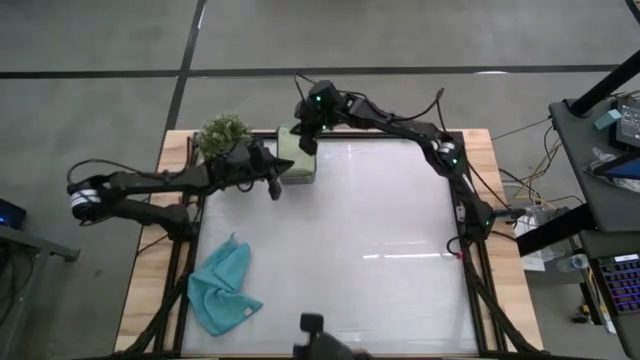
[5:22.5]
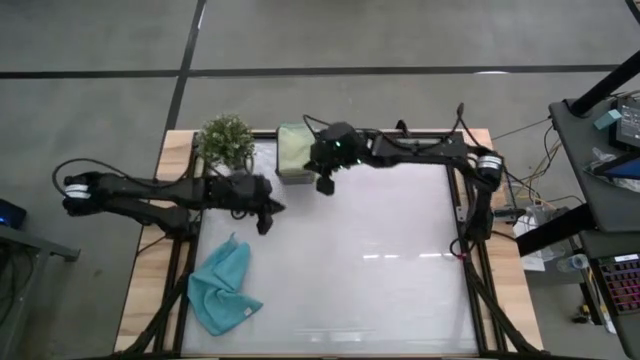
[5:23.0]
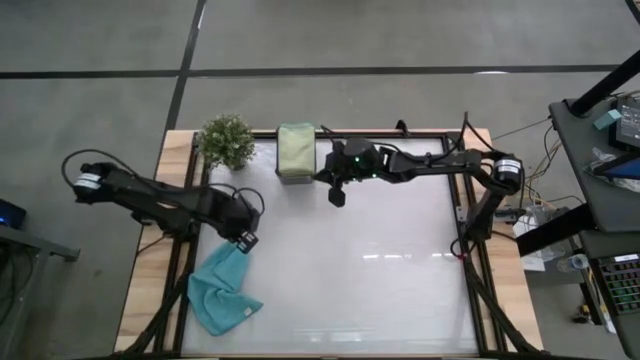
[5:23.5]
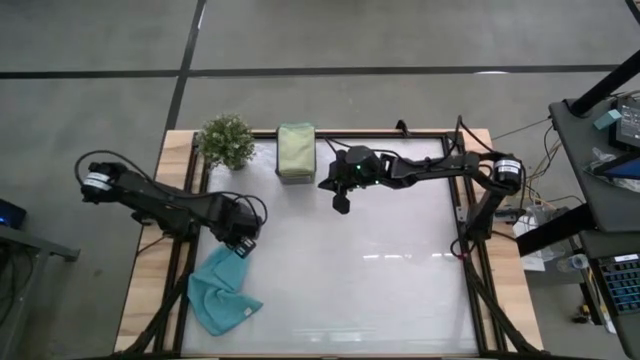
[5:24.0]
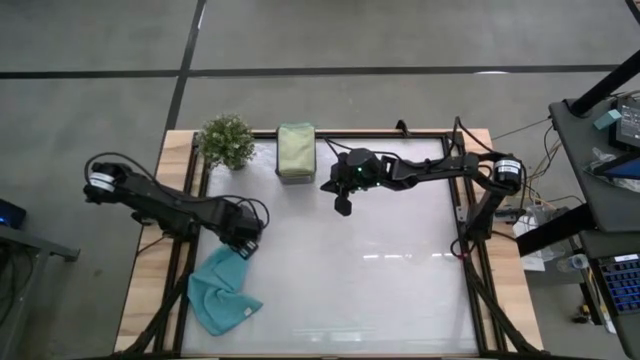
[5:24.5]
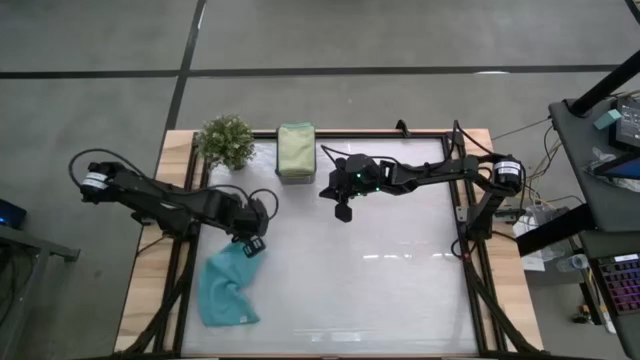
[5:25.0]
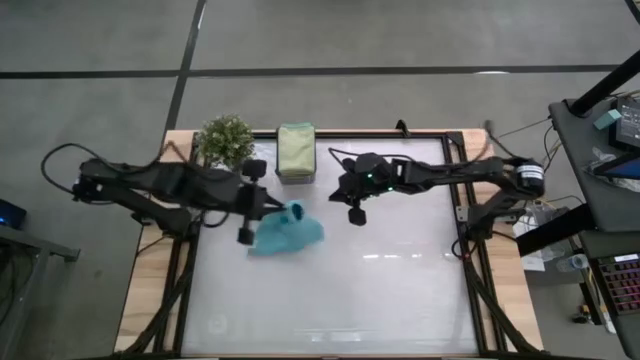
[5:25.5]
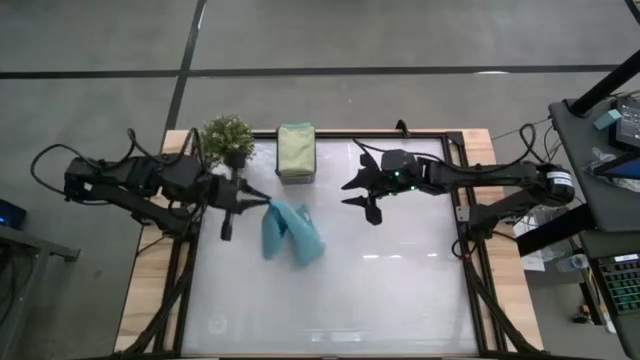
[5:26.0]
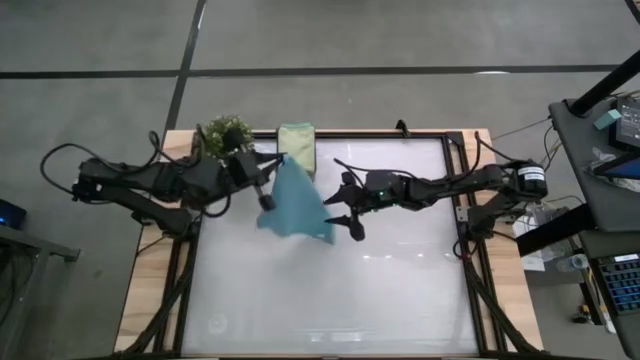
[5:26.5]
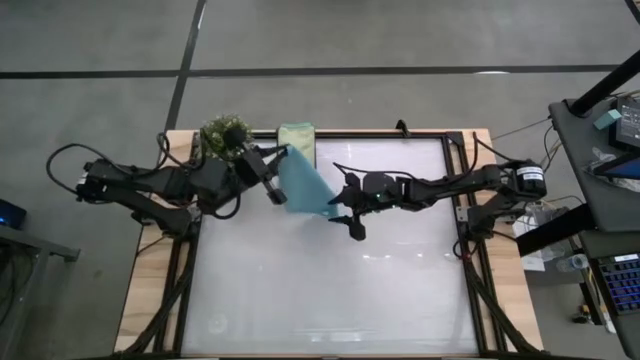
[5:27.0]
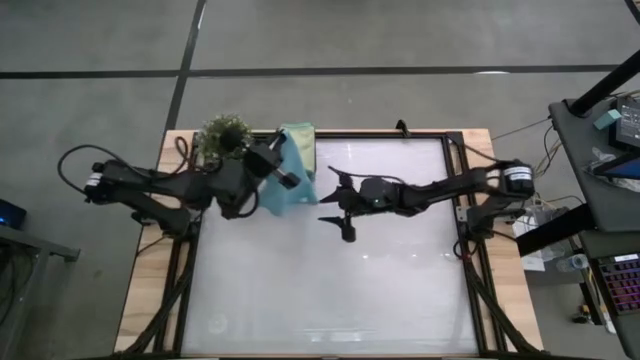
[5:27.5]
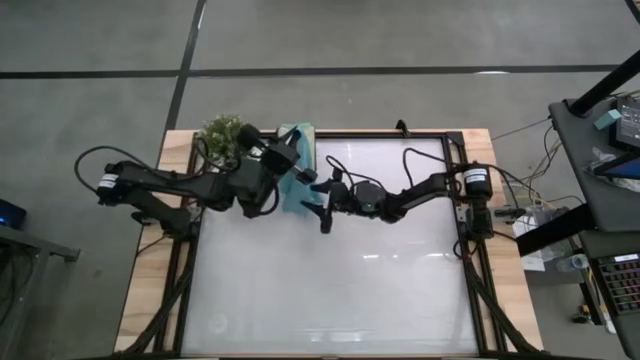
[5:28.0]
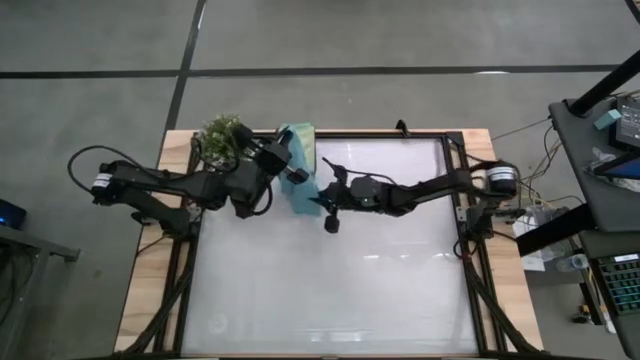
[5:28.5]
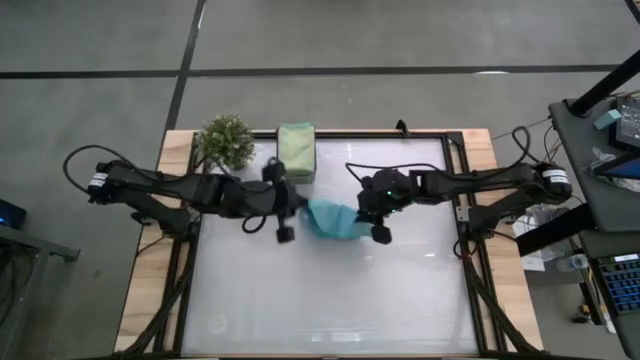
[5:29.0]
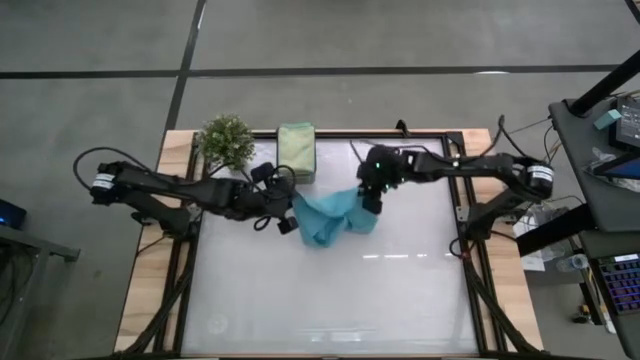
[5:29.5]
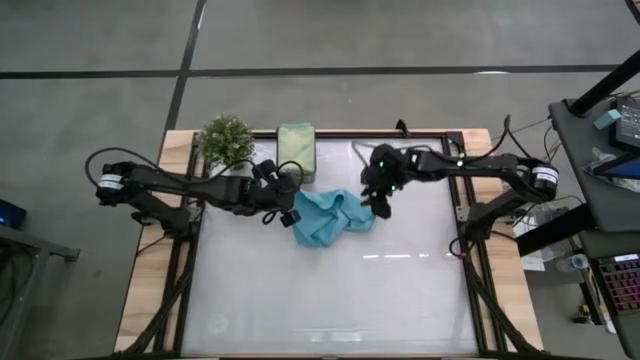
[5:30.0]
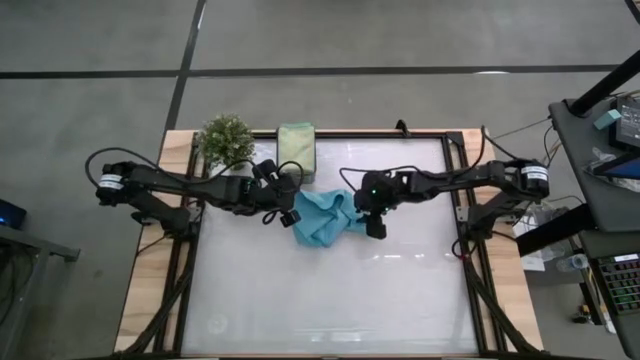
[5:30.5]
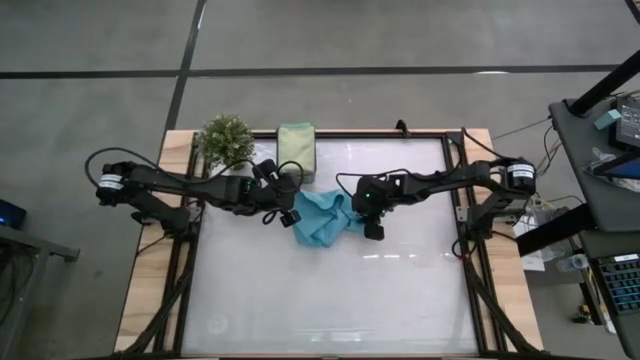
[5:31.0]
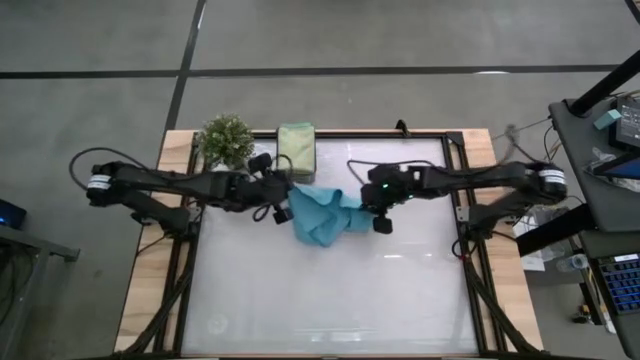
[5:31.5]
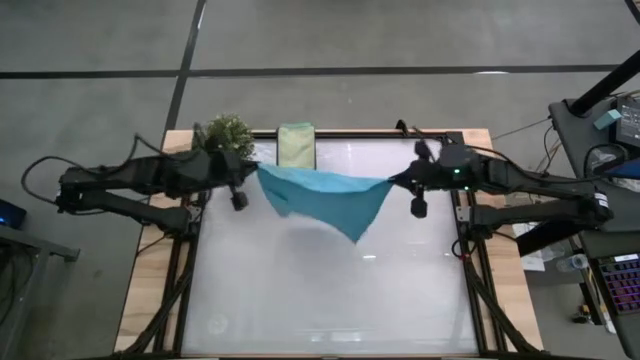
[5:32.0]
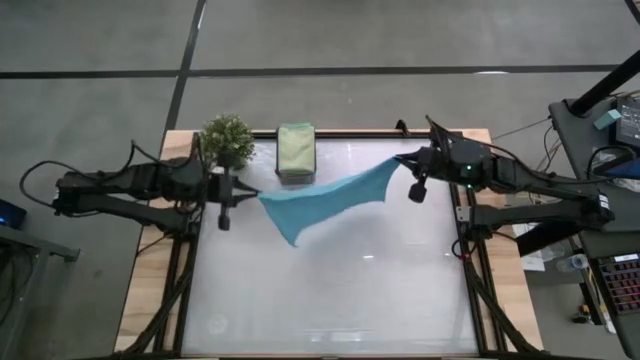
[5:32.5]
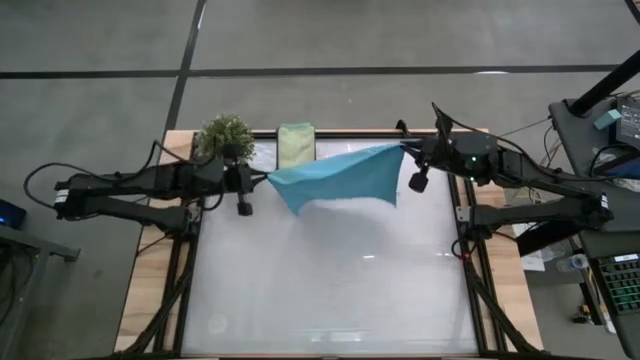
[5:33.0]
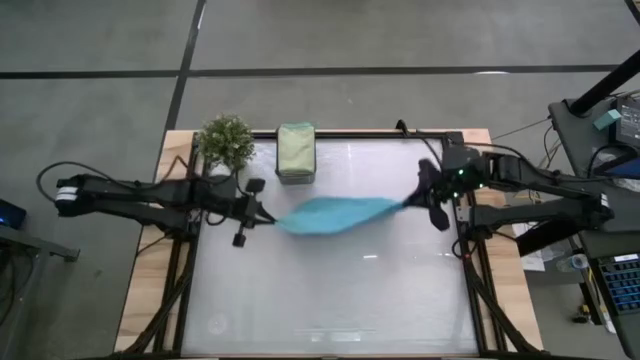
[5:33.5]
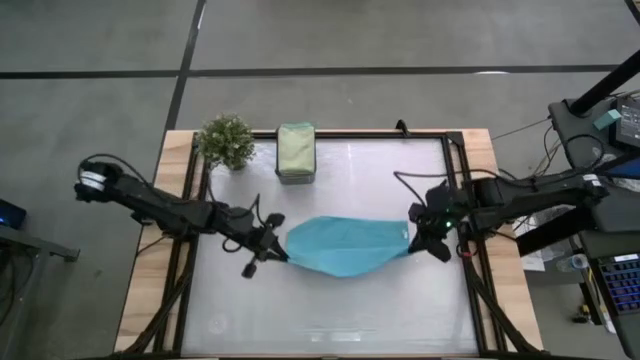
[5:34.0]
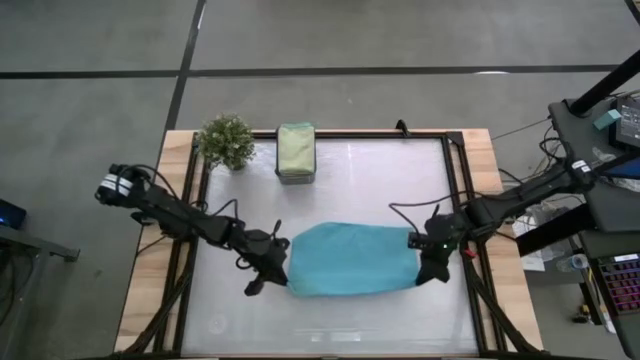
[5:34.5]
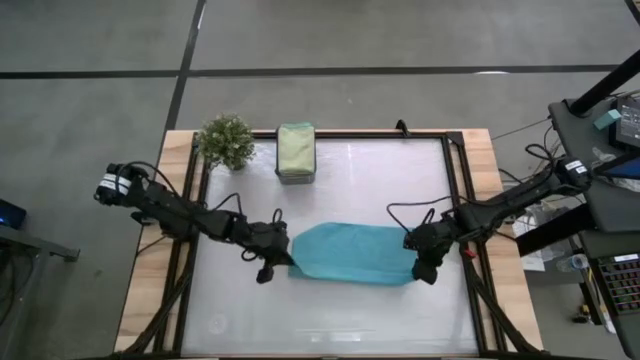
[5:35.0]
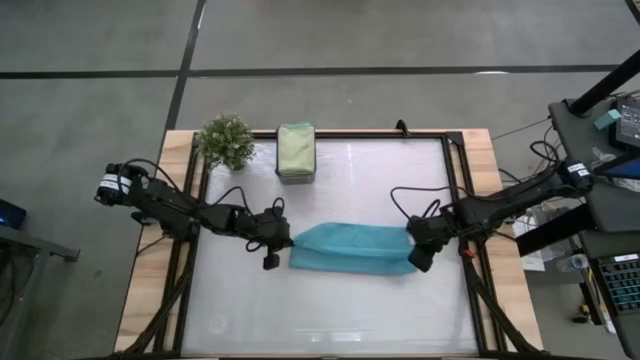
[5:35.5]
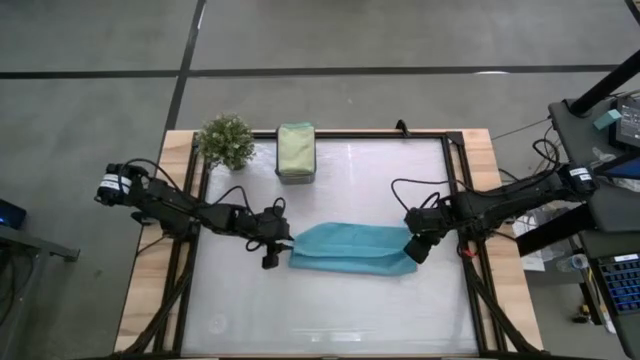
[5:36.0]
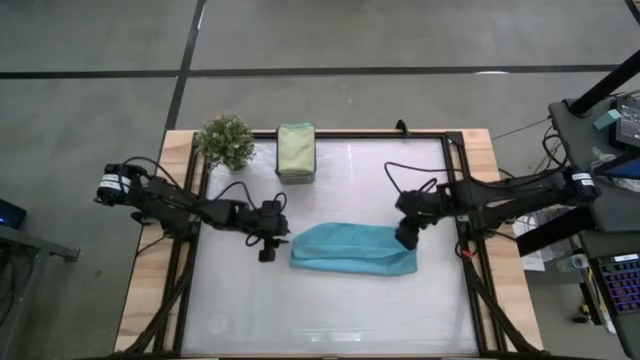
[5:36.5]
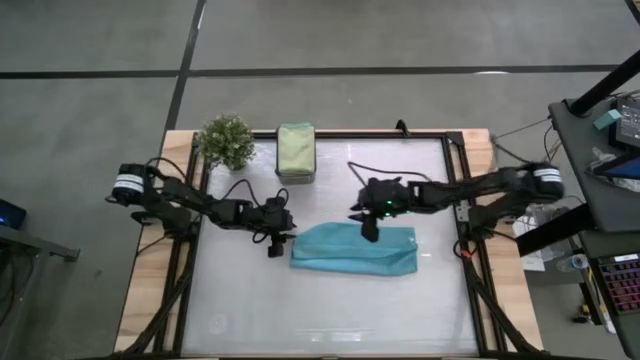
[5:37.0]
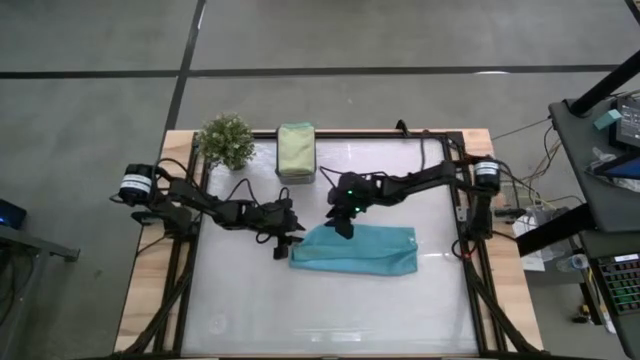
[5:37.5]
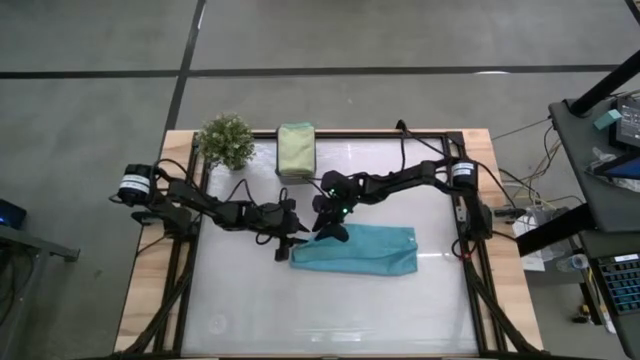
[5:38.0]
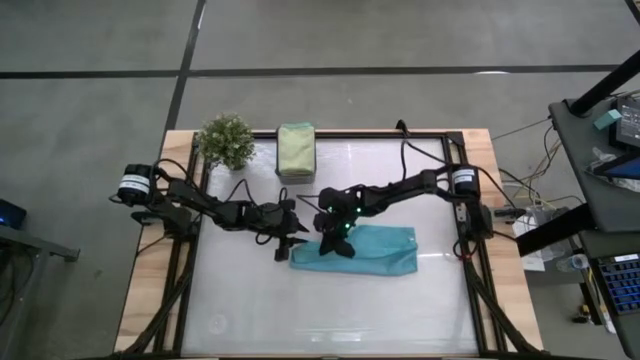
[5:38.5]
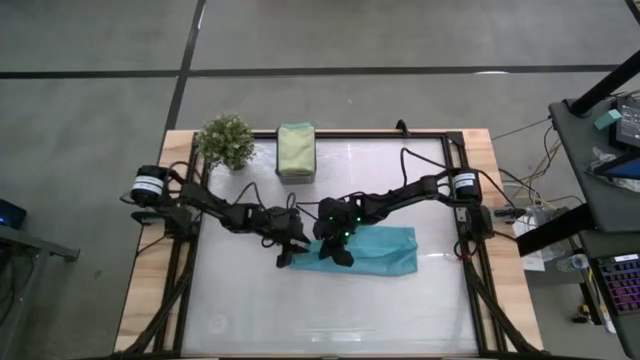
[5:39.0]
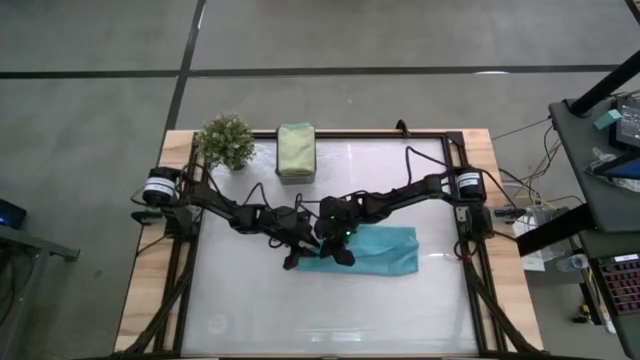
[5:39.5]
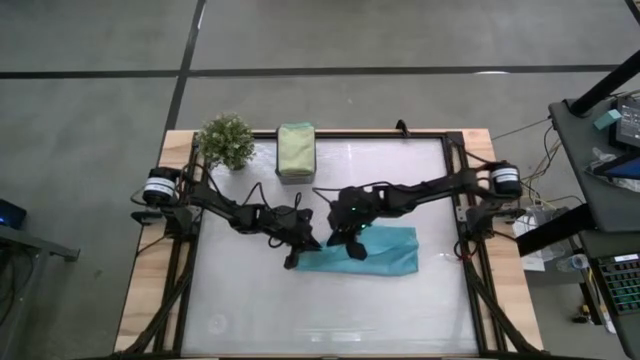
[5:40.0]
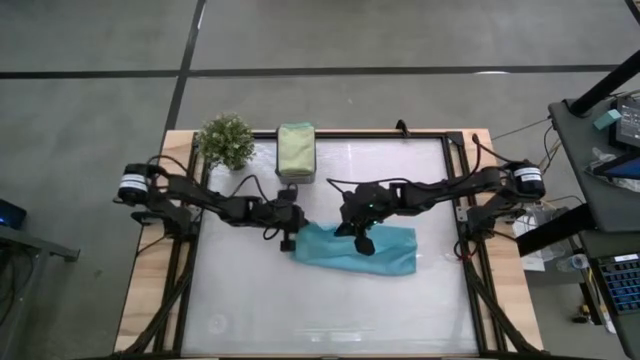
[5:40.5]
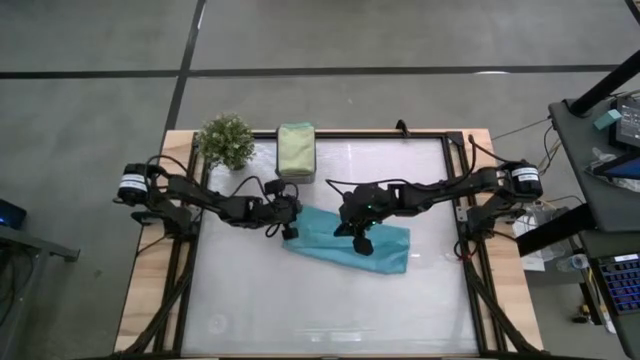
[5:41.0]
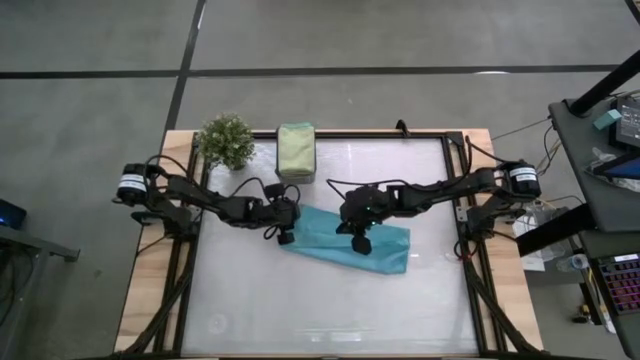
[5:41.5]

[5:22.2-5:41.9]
Task: Fold microfiber towels
Fold the blue towel

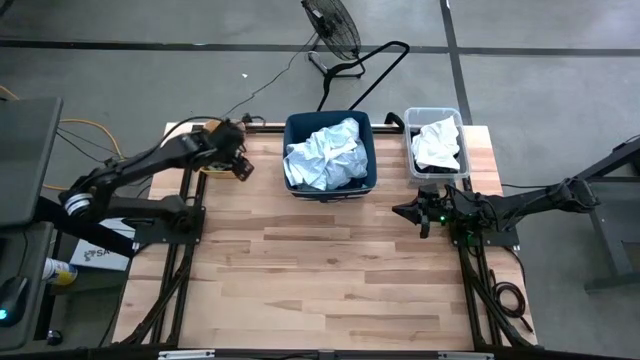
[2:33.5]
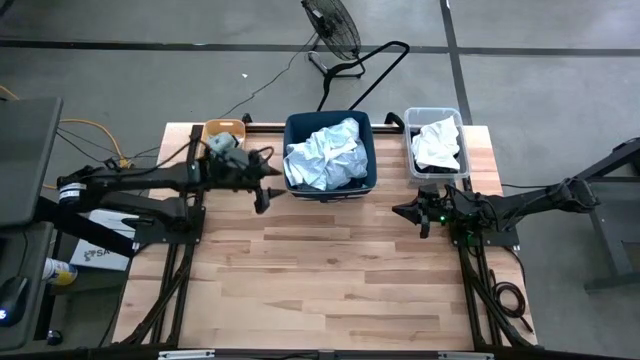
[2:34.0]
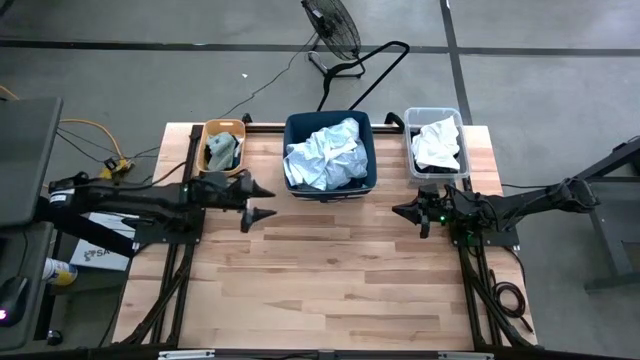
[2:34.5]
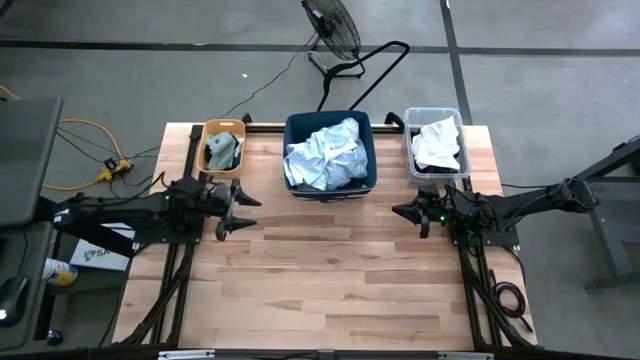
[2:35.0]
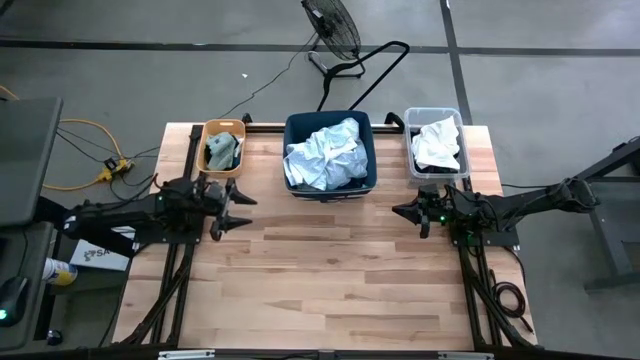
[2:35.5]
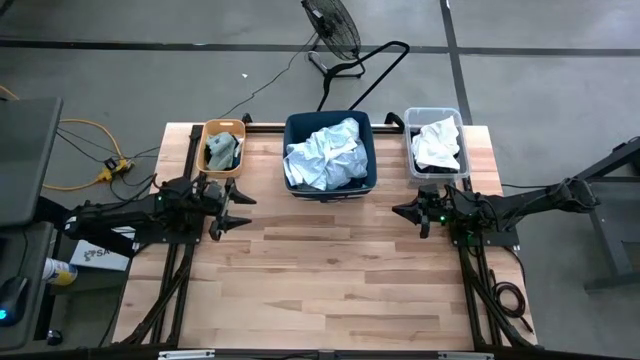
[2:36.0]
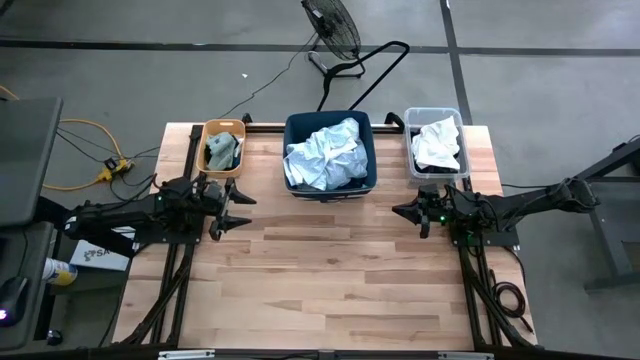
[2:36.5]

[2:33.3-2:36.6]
Task: Pick & Place Cloths
Return to Home Position
